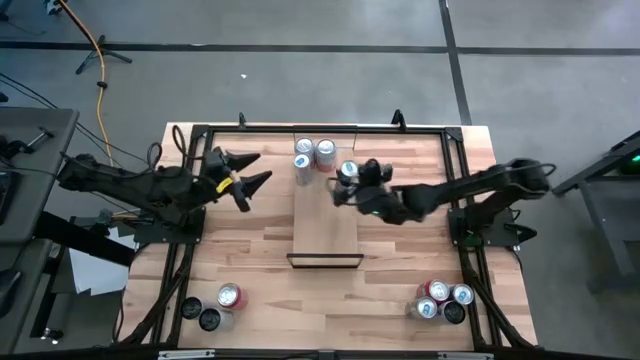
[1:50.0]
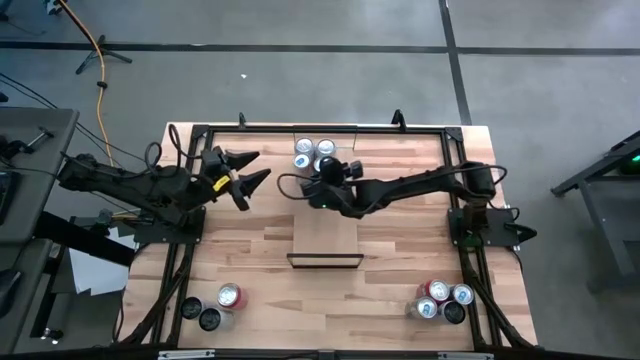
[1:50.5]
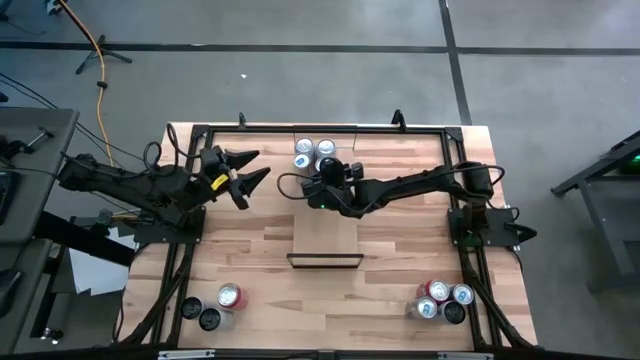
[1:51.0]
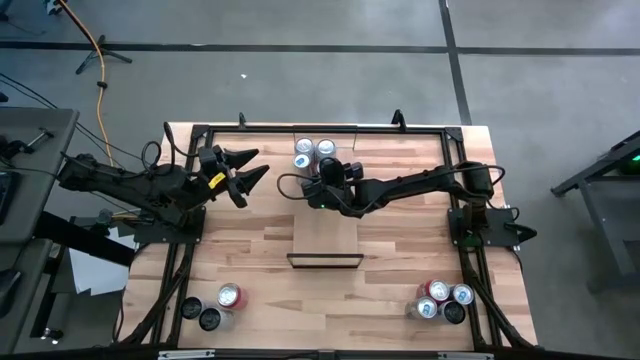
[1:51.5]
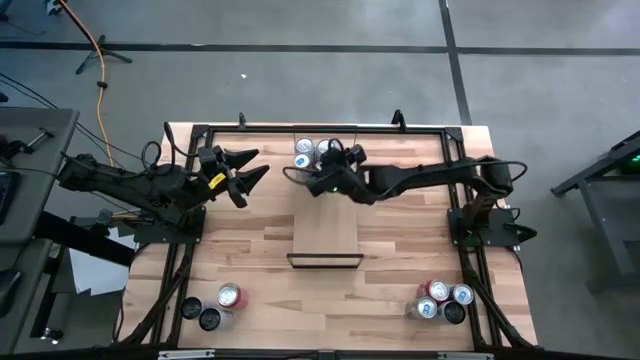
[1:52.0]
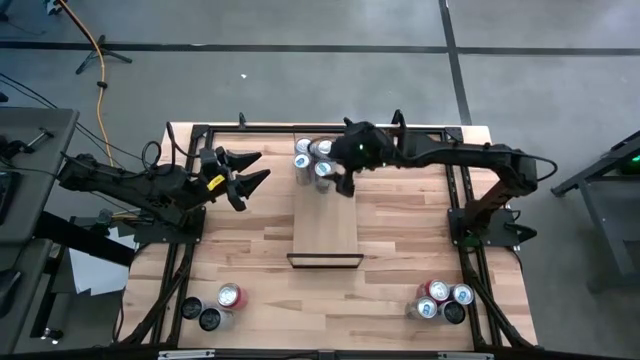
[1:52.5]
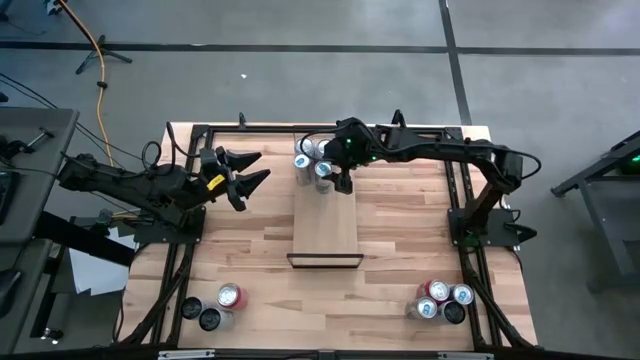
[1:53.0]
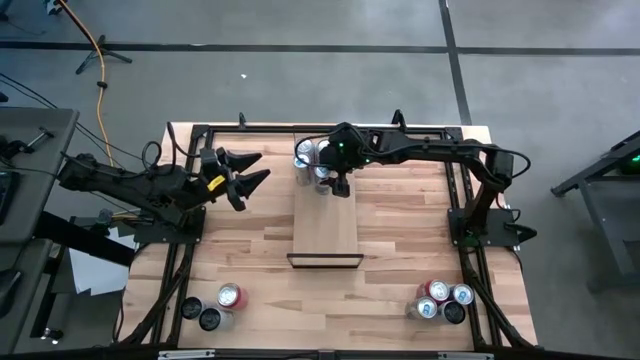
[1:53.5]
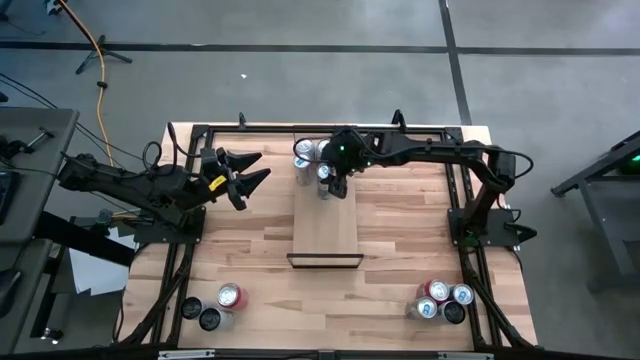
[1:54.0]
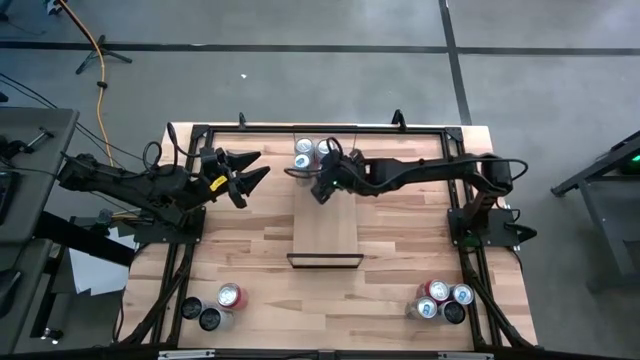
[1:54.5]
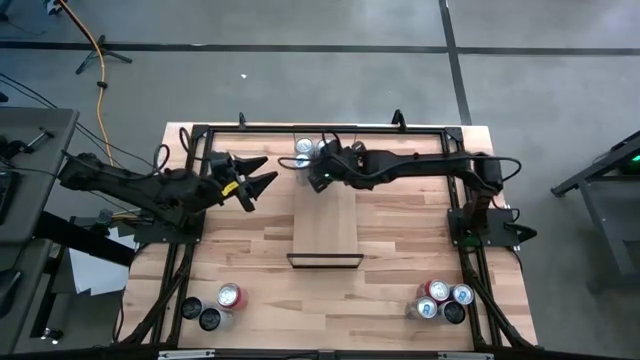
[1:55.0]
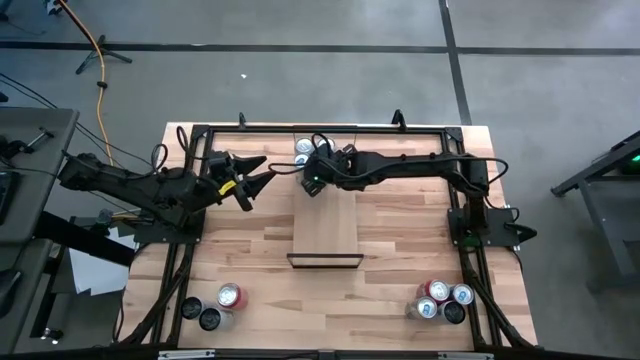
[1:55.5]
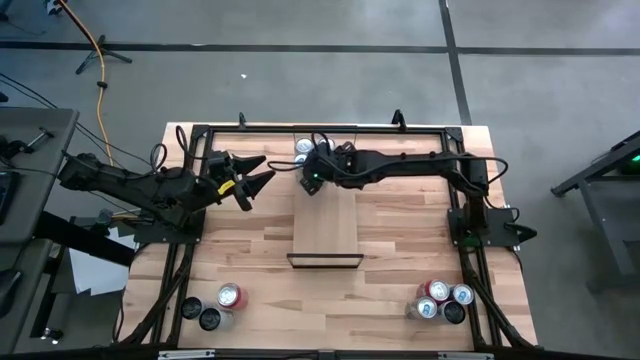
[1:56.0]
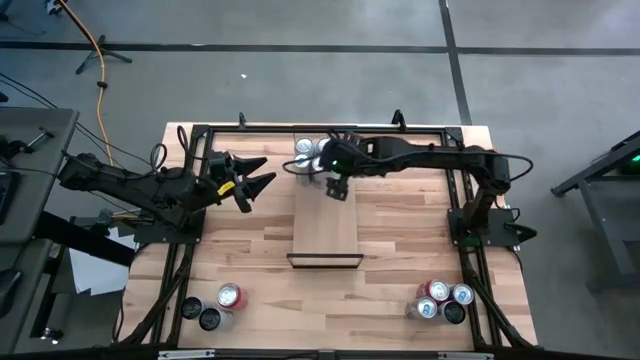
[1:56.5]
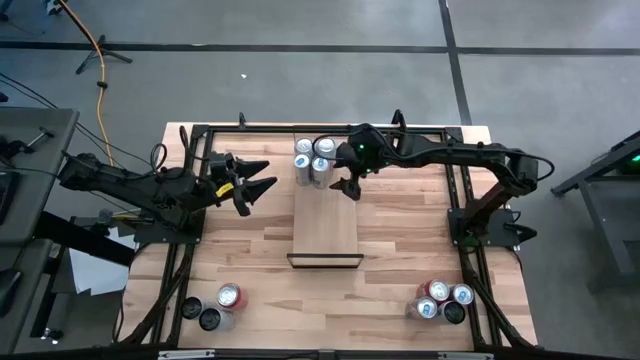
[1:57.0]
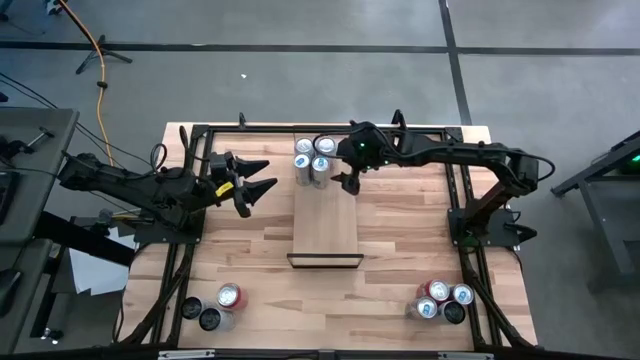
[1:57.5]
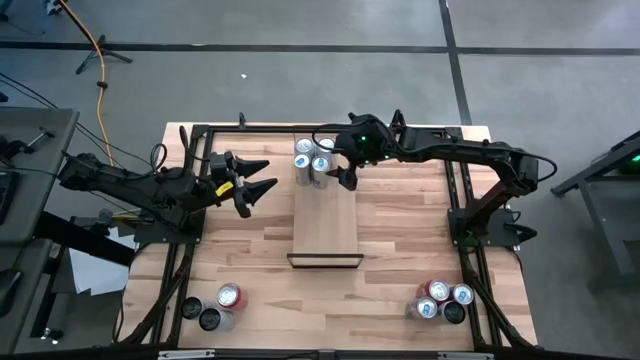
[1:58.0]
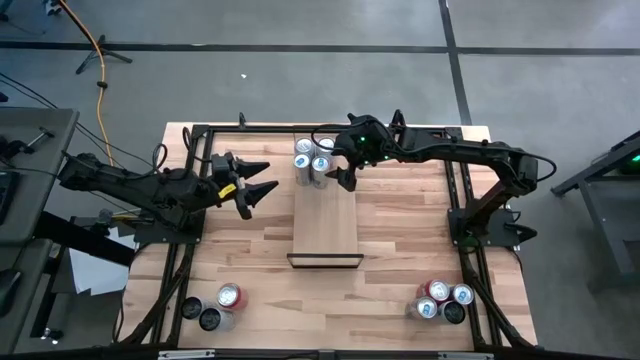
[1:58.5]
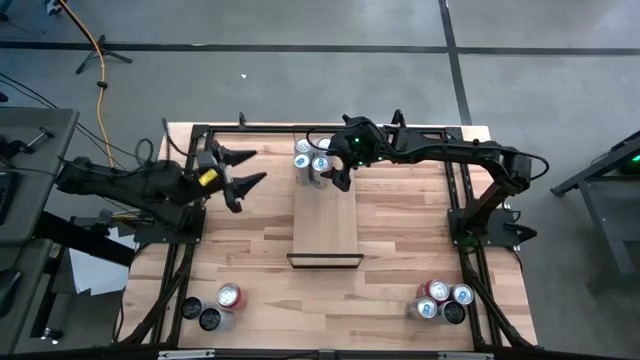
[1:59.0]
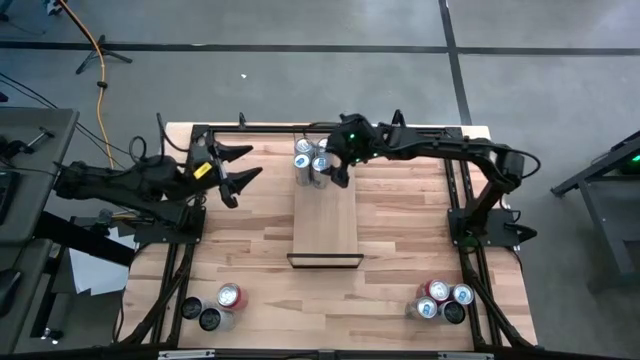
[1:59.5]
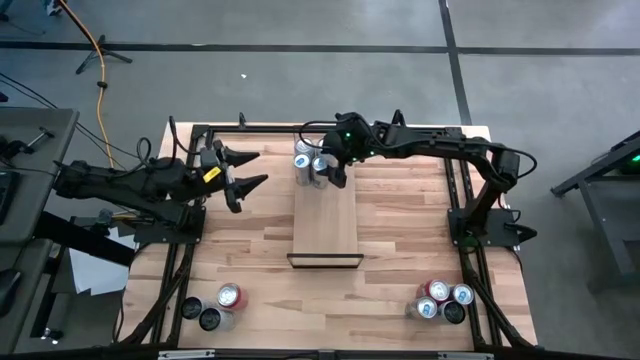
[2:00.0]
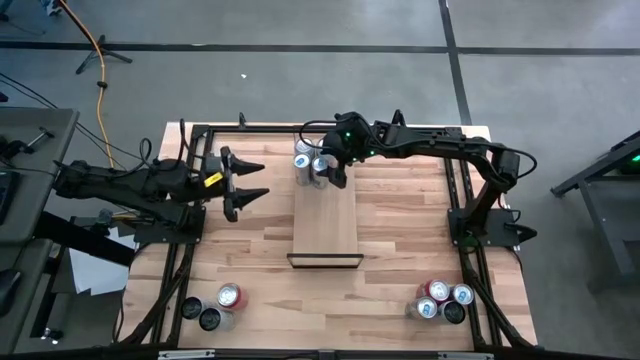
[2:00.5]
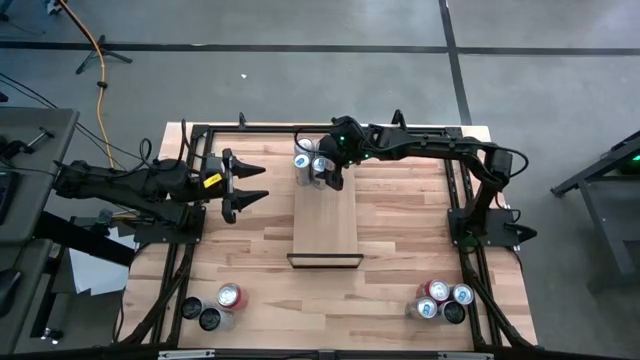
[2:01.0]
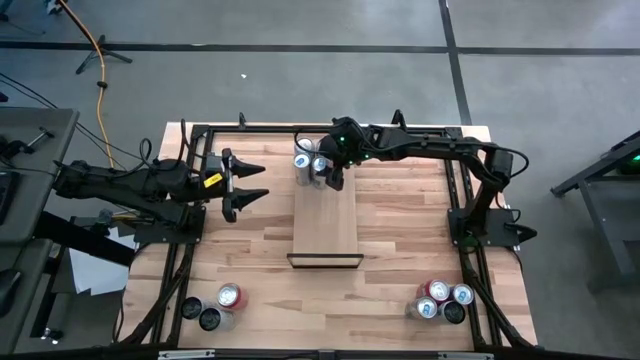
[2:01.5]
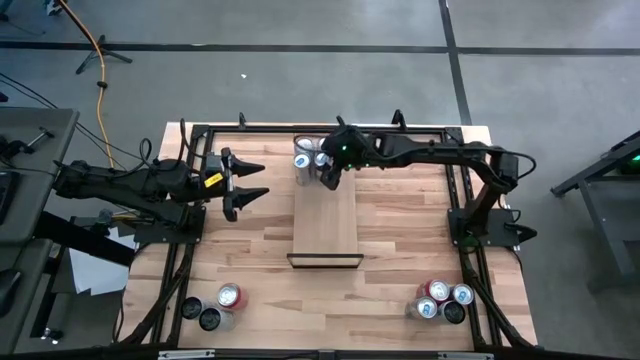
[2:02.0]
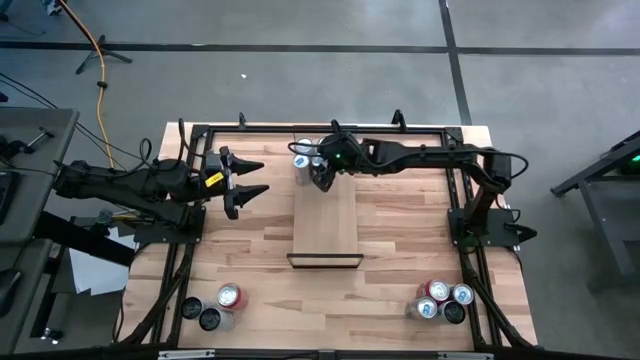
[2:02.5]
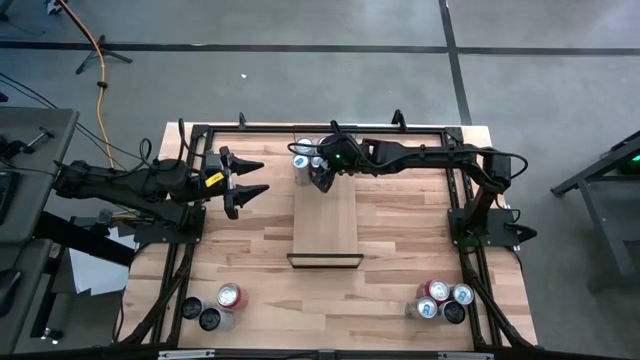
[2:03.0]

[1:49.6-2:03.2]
Task: Place canned beverage on shelf
Put the blue soda can on the shelf aligned with the other blue soda can

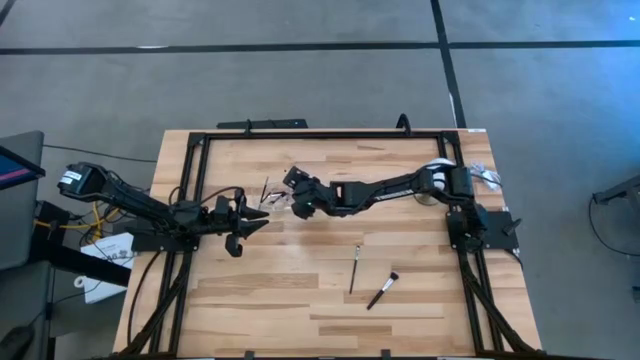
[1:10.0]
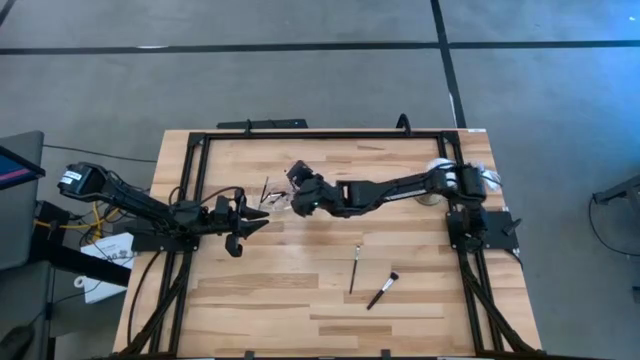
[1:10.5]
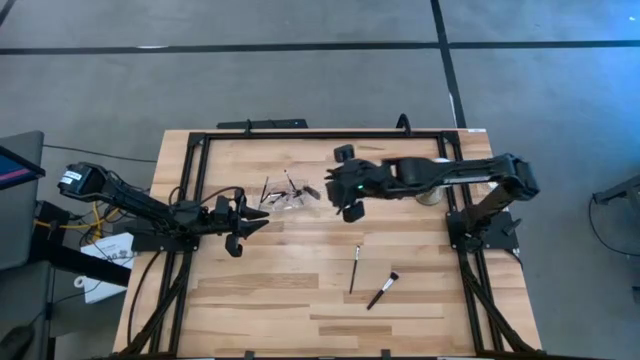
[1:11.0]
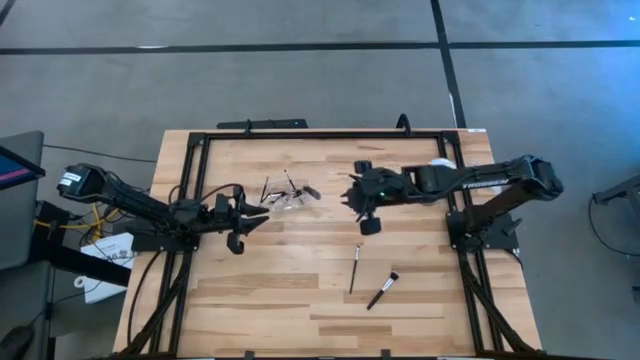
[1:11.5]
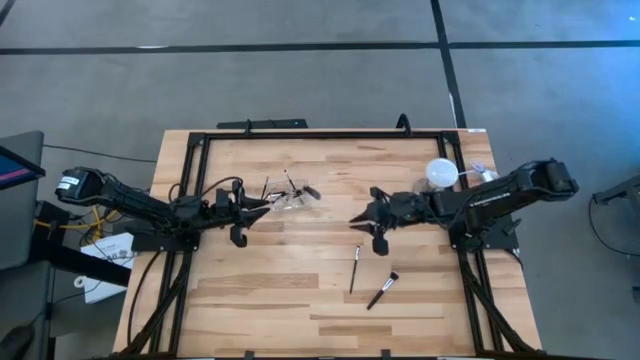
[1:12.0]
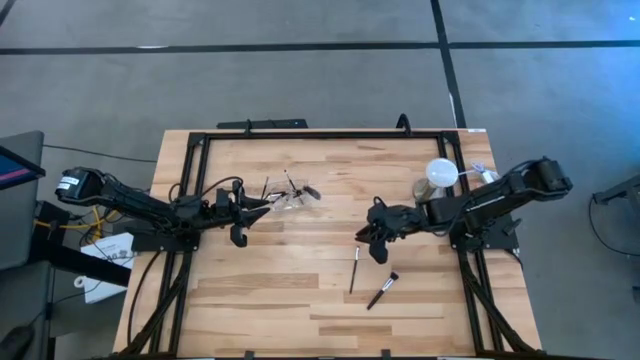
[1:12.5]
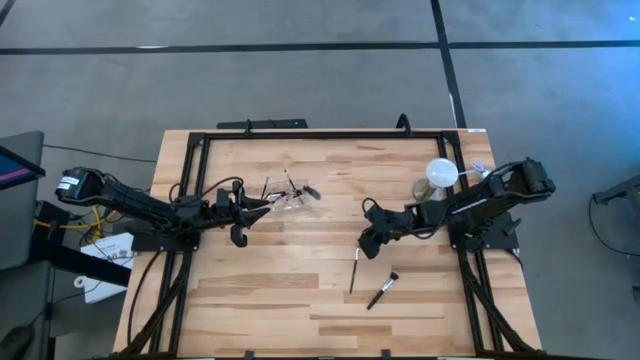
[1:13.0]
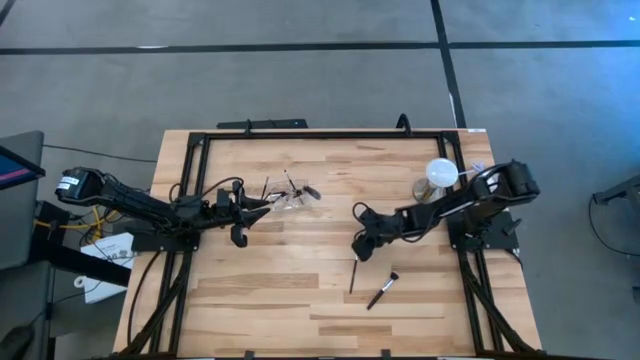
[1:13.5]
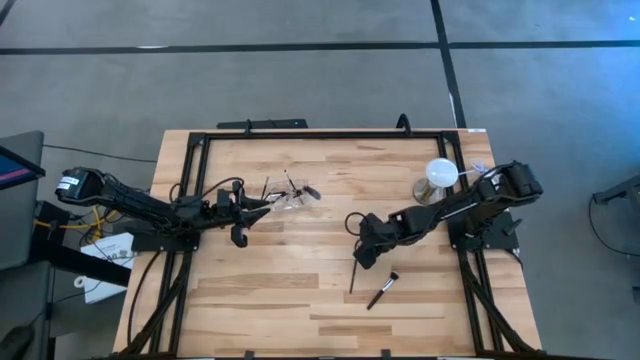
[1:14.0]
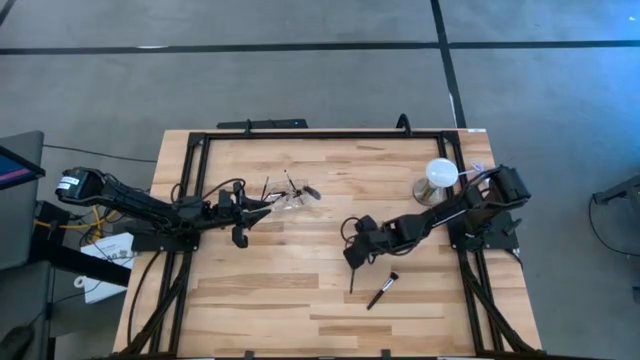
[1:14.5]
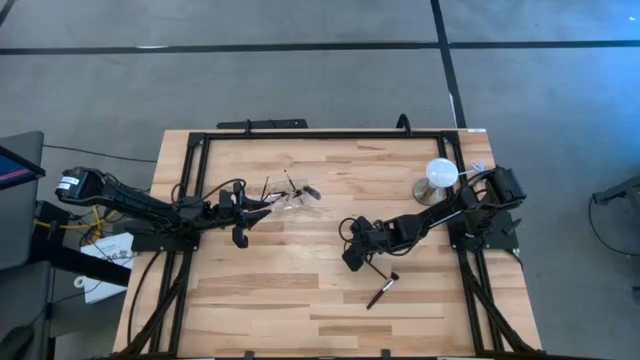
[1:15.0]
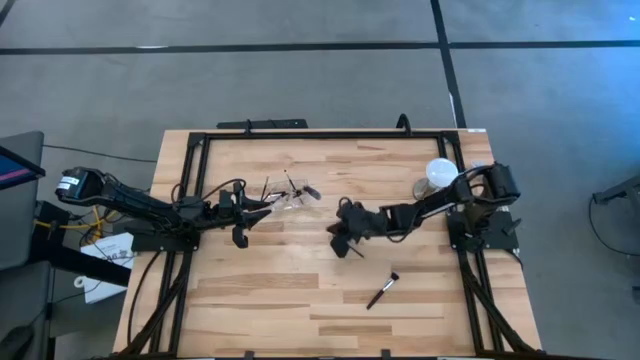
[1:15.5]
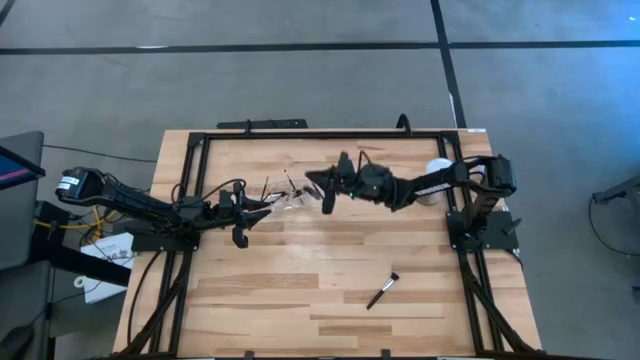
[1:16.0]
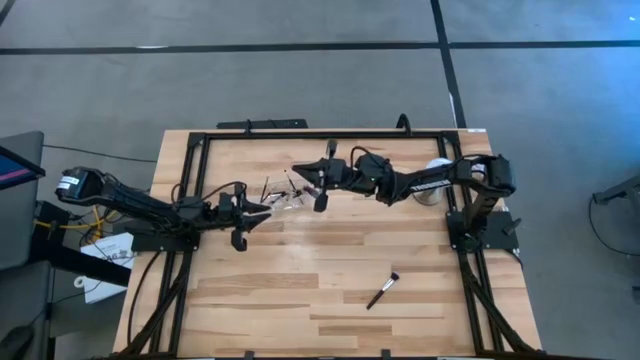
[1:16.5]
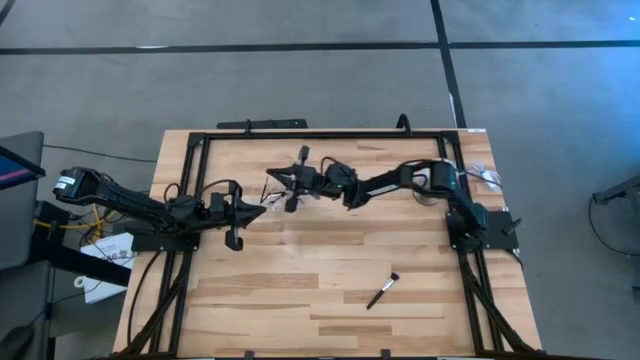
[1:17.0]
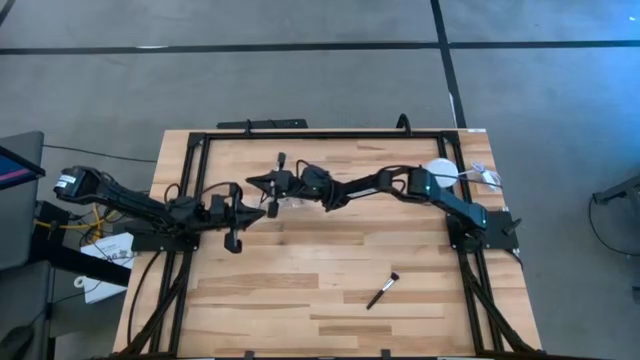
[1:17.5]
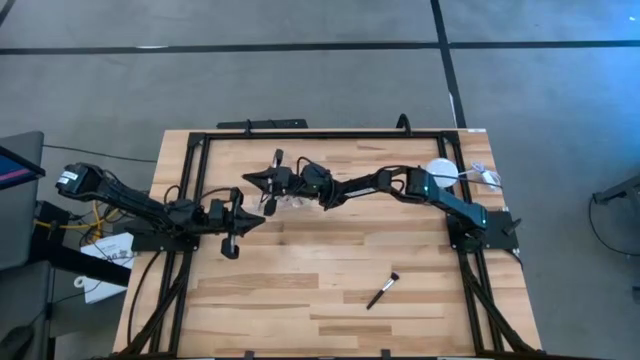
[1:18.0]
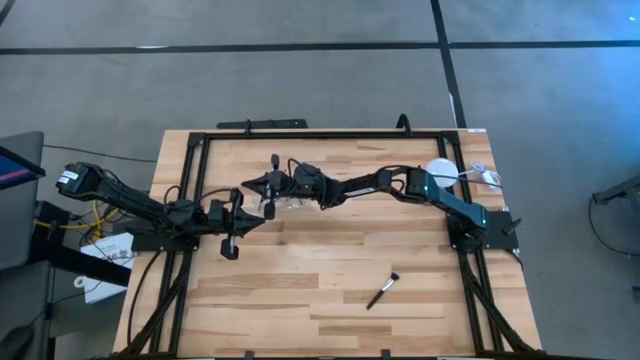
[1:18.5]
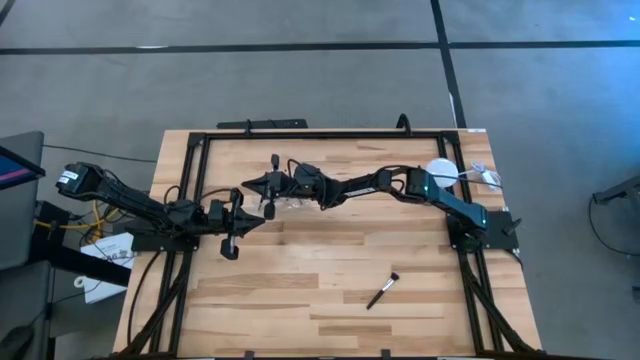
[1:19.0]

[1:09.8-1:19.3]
Task: Put items in baskets/containers
Put the eyeshadow brush into the transparent organizer
